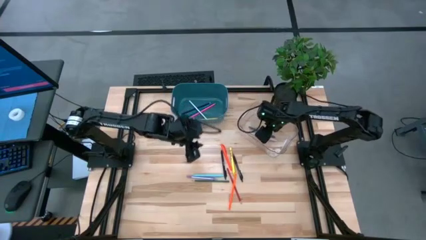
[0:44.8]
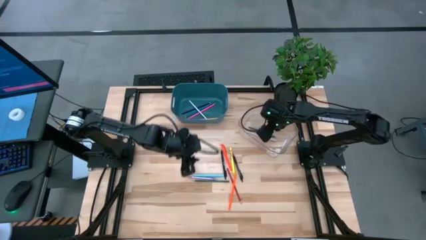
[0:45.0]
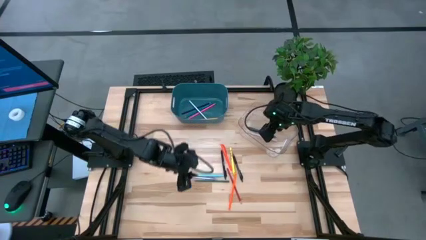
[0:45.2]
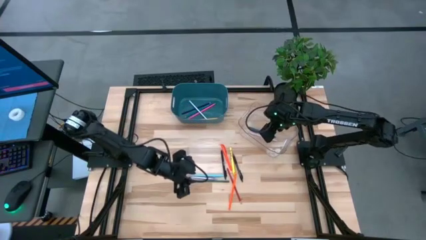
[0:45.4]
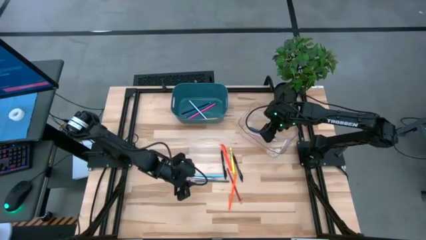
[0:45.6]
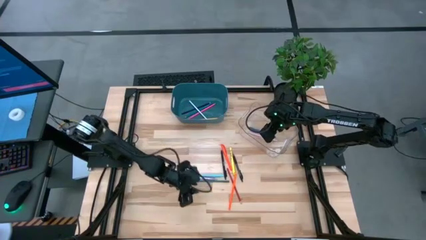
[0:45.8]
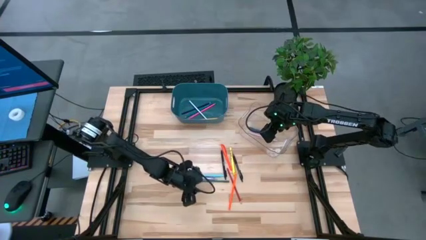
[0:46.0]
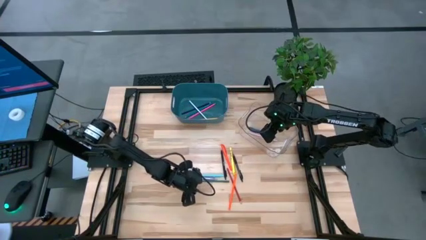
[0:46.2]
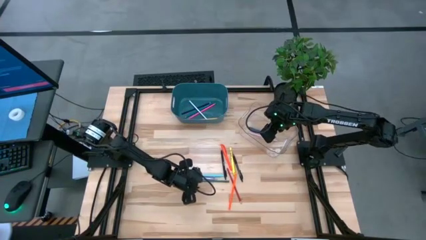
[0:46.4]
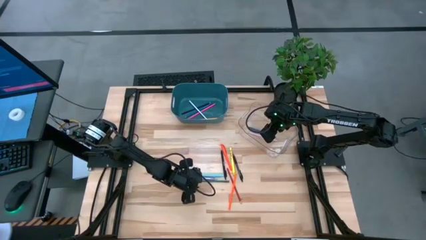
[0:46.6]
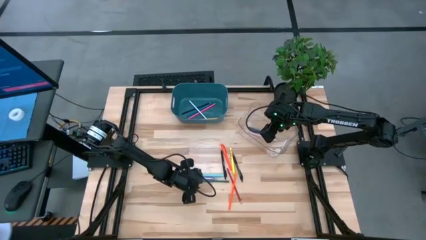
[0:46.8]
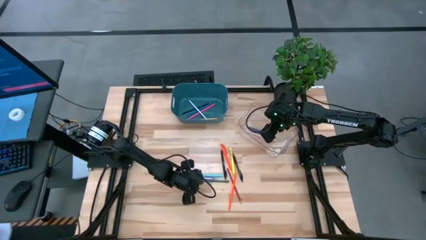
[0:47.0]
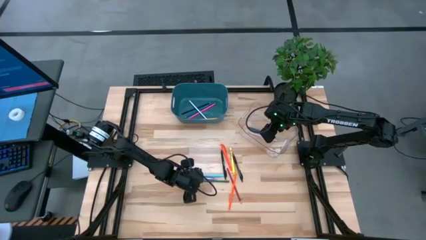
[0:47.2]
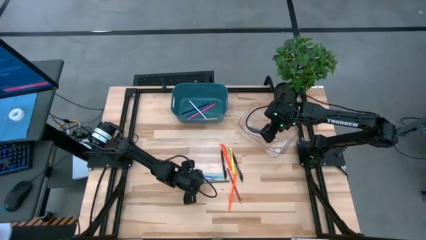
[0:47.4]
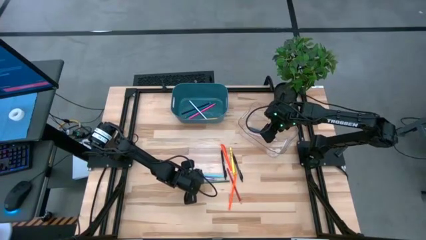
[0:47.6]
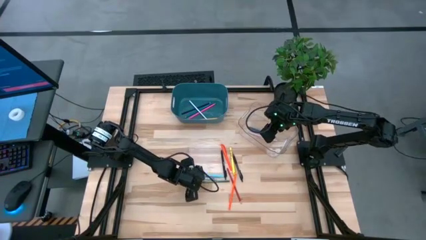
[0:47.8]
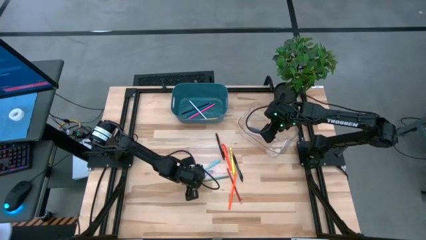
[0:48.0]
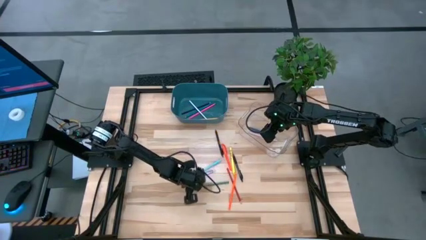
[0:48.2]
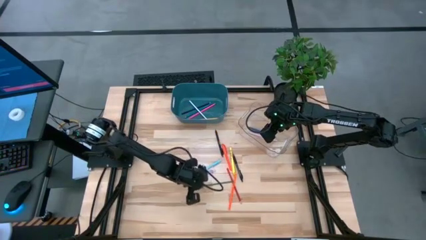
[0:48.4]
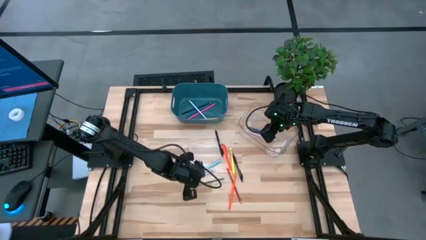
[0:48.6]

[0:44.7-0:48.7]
Task: Sort pens & pencils
Put the green pencil into the blue bin

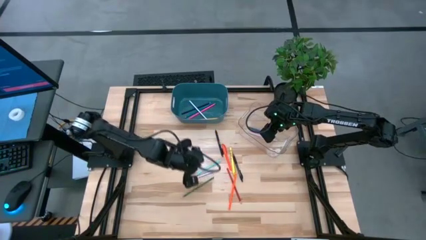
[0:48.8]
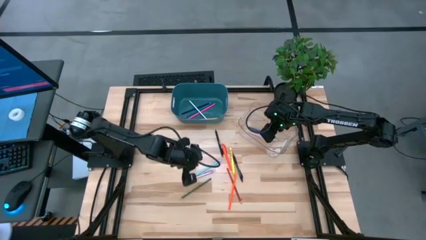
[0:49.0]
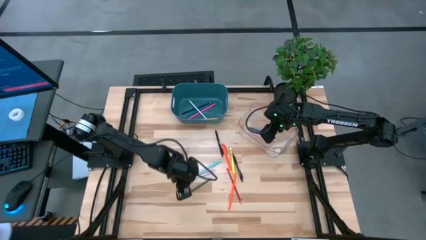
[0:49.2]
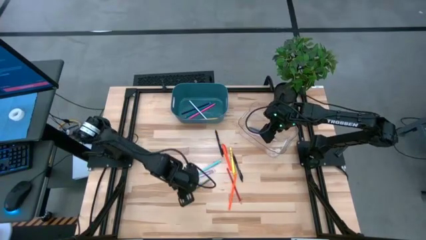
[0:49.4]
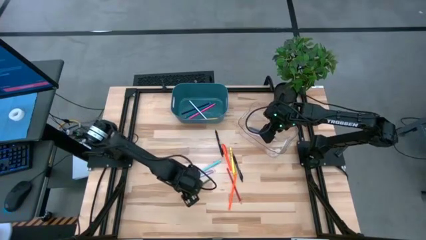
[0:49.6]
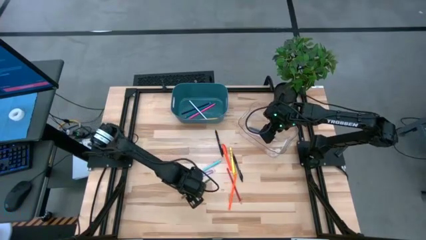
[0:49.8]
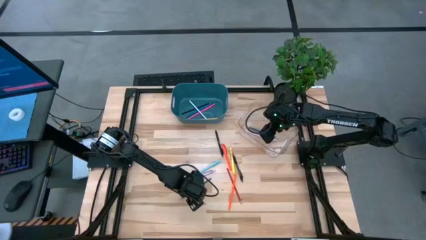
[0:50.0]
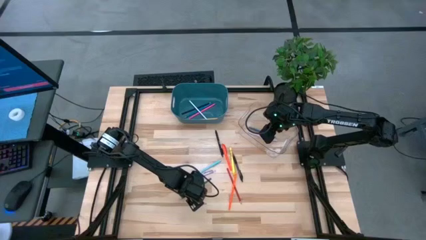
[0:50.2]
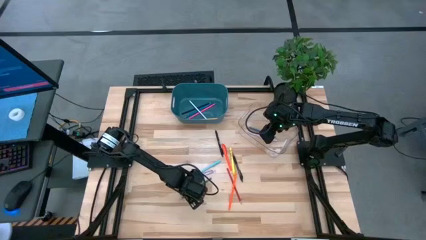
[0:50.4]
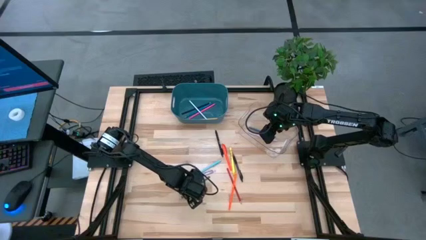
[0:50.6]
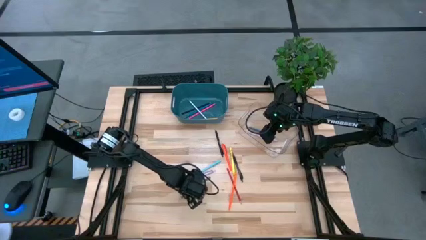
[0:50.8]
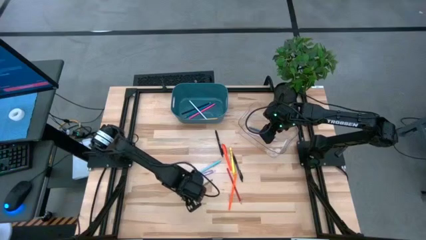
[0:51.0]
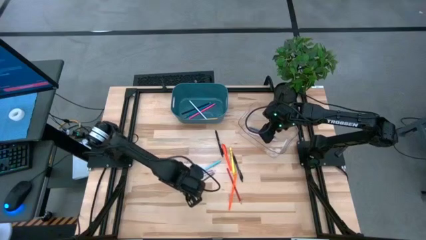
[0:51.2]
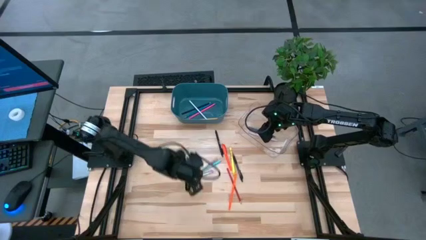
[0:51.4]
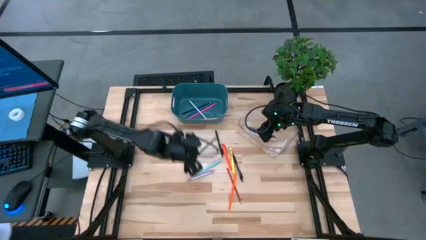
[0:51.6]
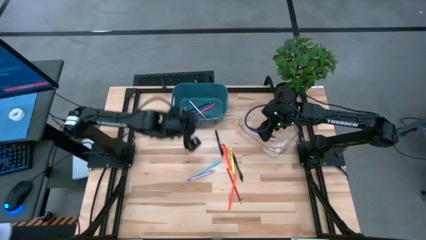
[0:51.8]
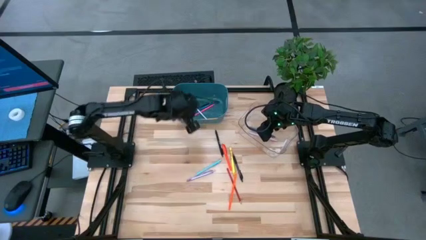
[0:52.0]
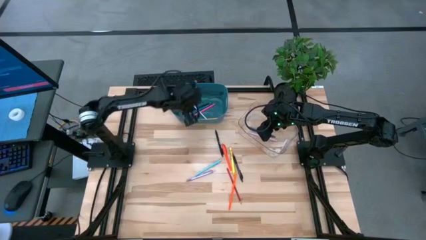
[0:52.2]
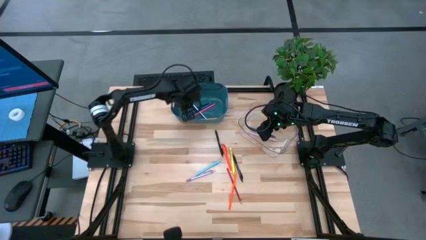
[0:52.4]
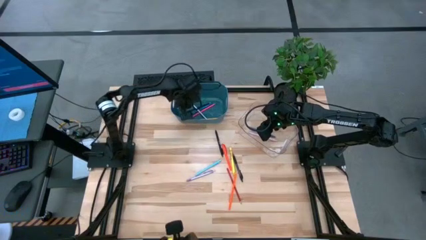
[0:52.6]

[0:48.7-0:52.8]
Put the green pencil into the blue bin

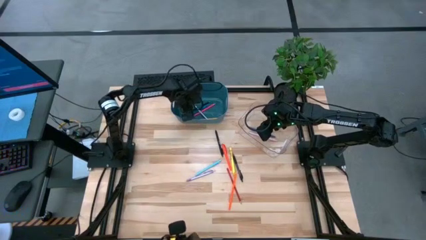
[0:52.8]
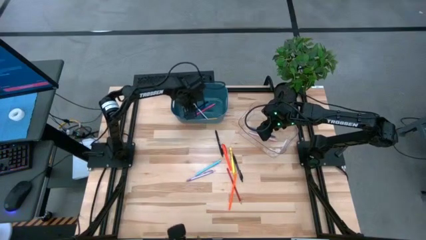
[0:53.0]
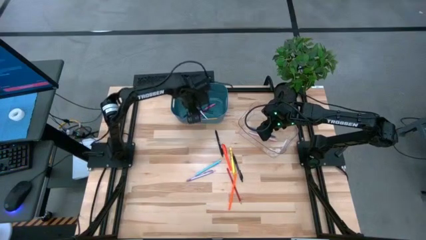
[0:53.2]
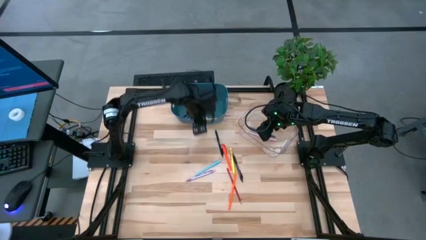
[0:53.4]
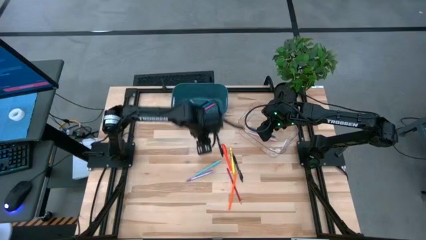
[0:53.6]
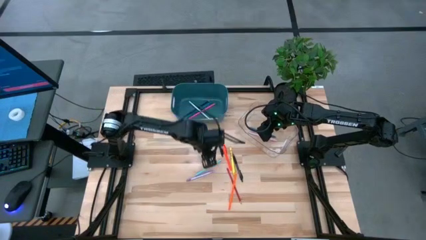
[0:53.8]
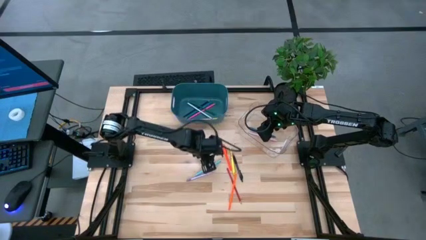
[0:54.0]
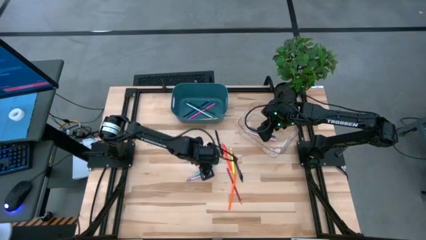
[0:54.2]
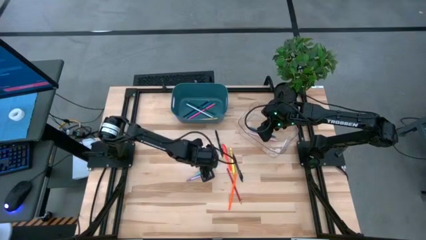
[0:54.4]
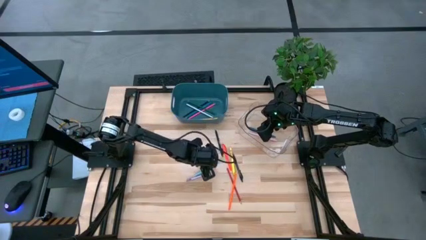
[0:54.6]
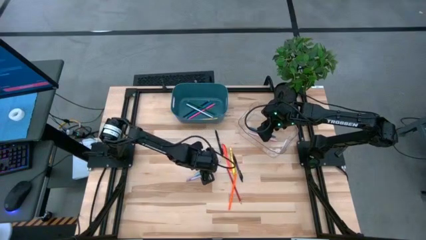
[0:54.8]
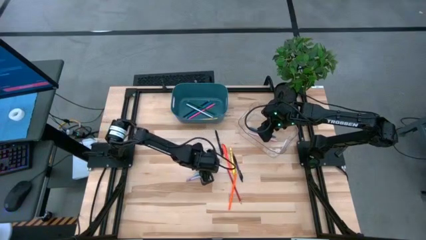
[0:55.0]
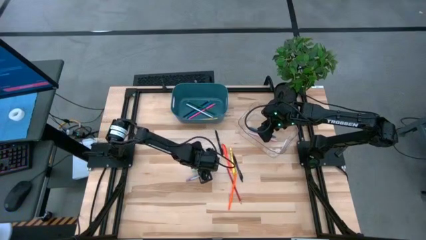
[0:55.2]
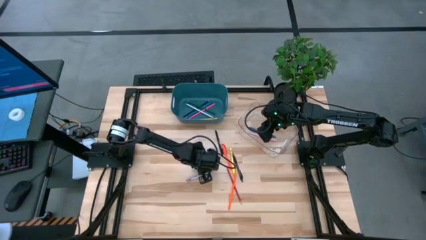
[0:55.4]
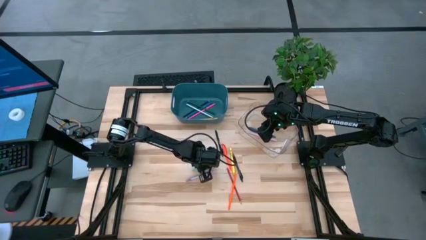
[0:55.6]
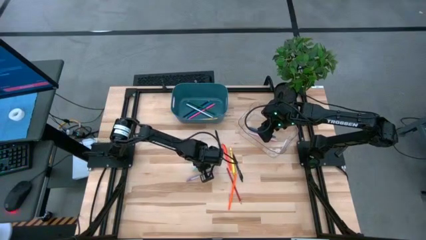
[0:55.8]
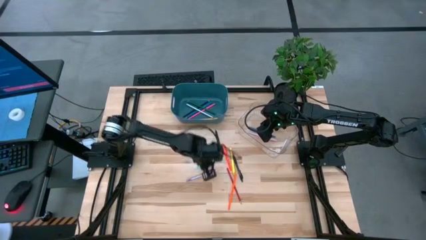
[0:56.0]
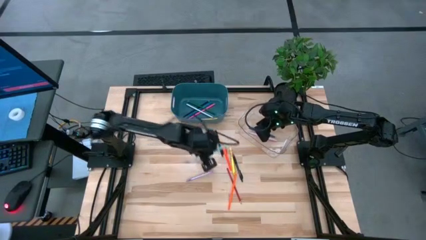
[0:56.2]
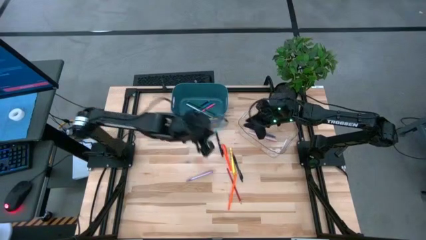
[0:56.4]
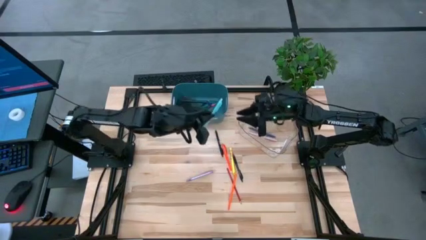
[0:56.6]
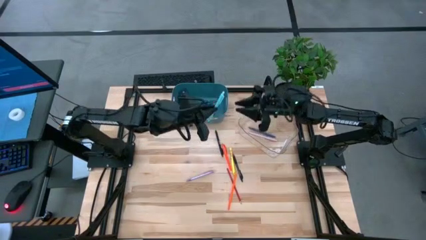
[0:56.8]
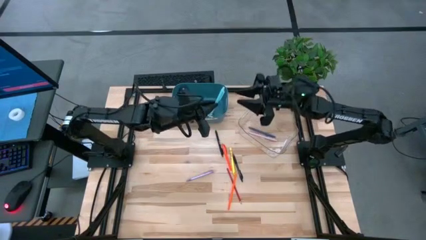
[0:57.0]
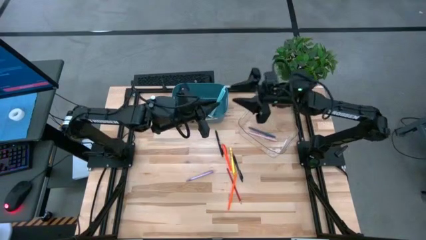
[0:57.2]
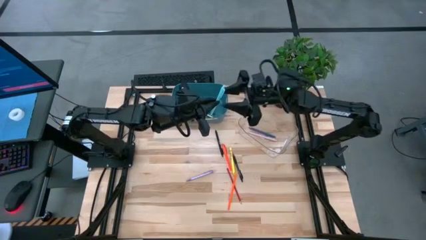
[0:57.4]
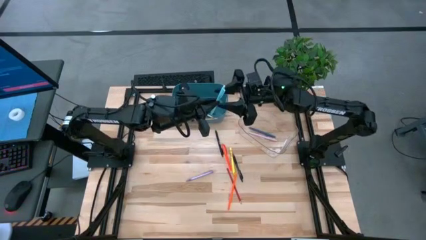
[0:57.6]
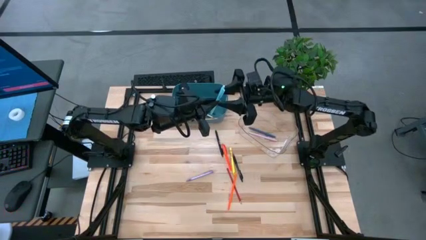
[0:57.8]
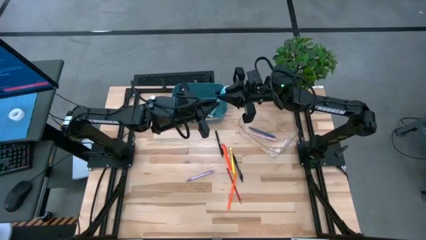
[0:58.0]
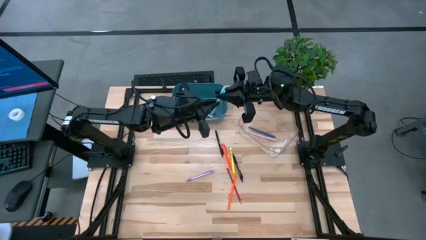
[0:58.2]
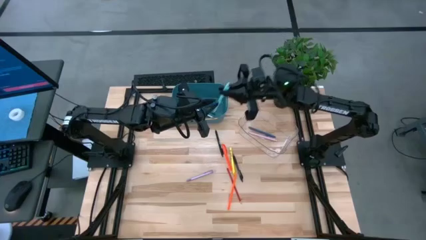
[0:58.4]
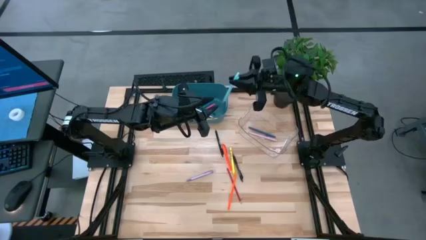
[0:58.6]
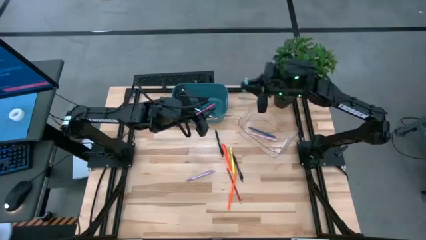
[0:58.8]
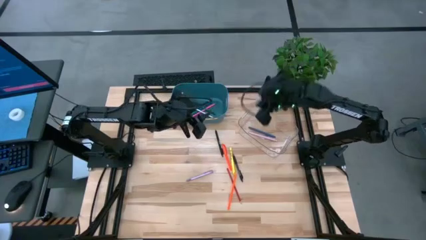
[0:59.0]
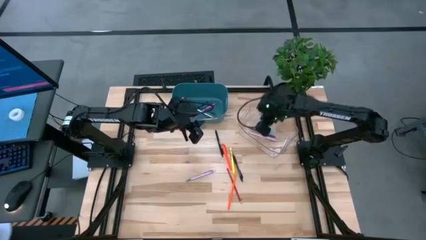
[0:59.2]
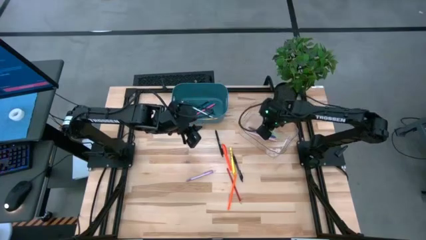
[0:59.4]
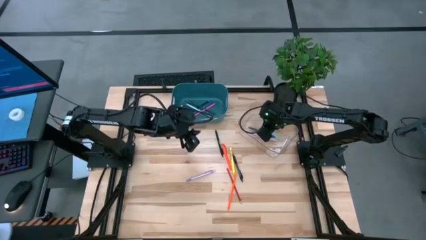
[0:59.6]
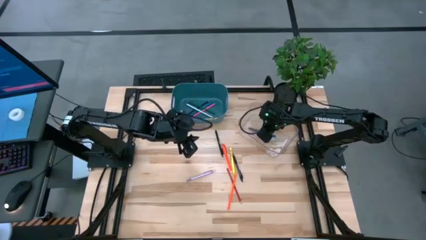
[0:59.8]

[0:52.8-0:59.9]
Put the light blue pen into the transparent bin

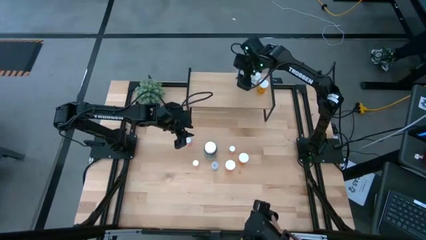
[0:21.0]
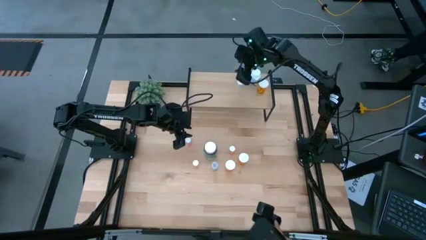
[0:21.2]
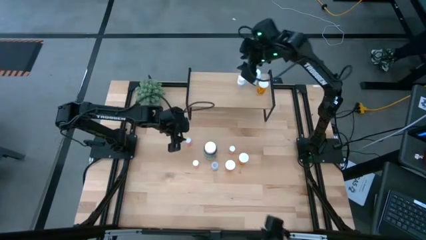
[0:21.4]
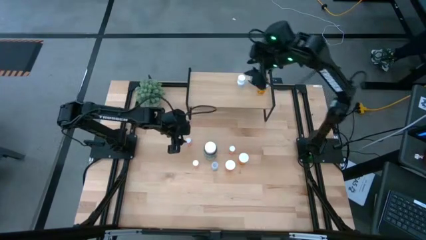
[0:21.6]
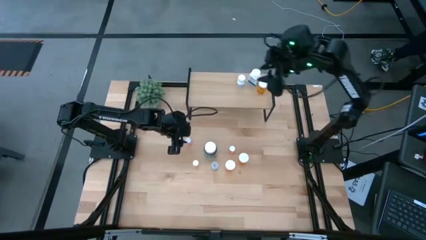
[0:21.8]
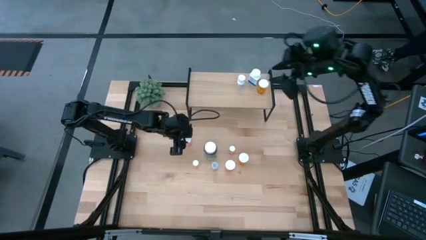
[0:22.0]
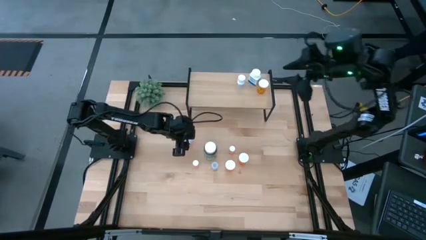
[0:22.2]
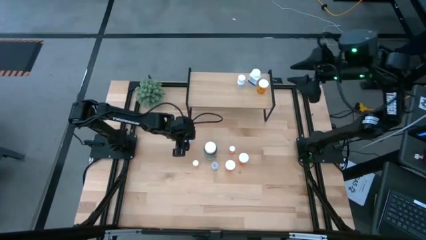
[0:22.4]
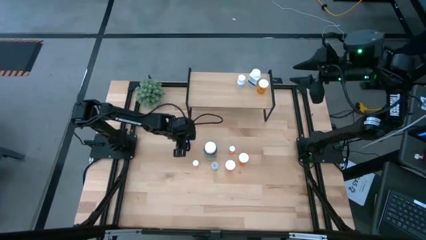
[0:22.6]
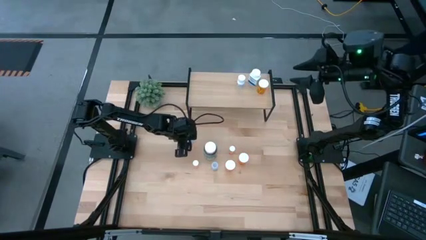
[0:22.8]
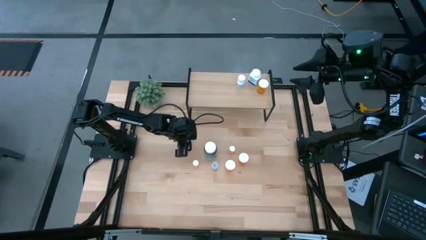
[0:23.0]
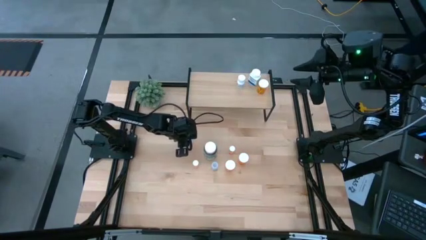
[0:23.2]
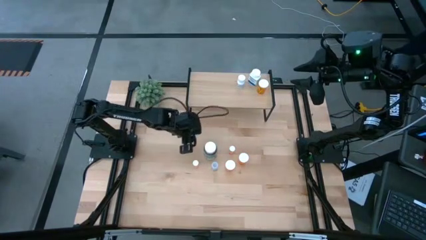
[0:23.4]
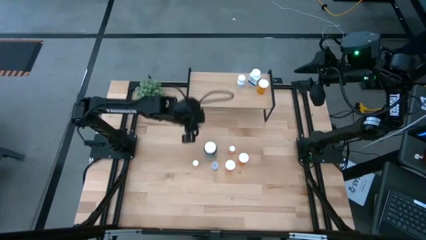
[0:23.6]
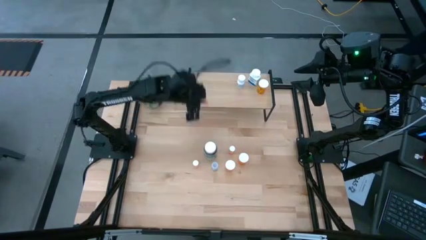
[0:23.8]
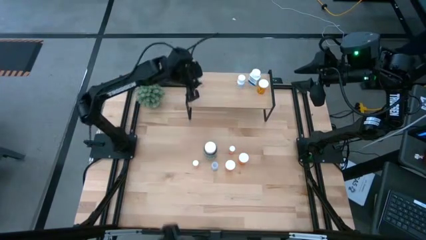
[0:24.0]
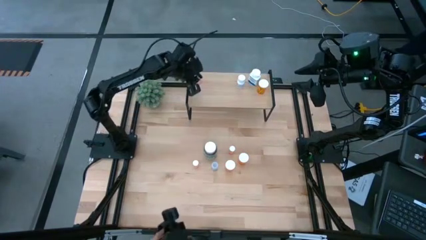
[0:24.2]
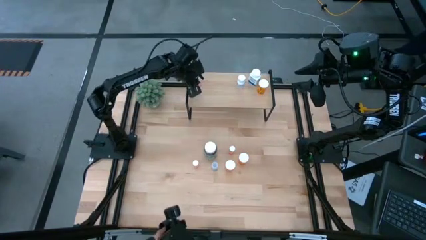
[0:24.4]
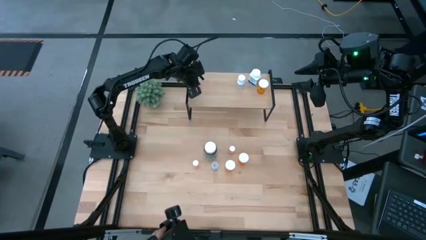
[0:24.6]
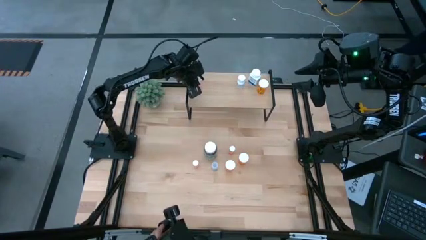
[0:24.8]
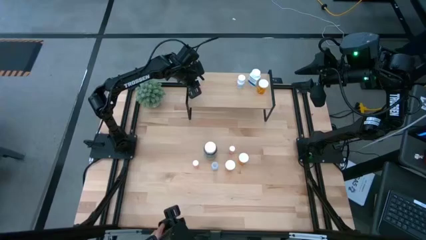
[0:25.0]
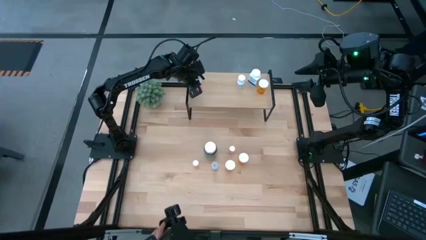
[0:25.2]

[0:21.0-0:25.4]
Task: Pick and place medicine bottles onto shelf by color
Put the top left pink pill bottle on the shelf
